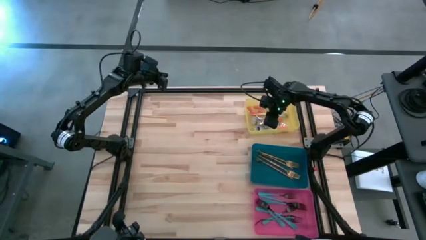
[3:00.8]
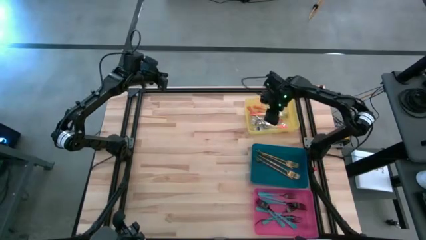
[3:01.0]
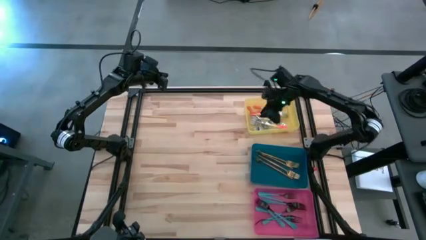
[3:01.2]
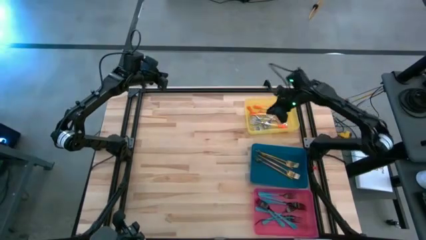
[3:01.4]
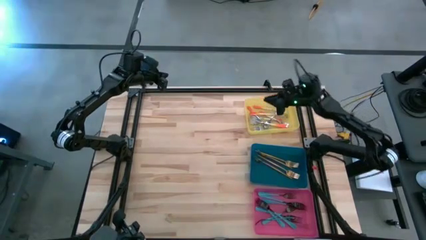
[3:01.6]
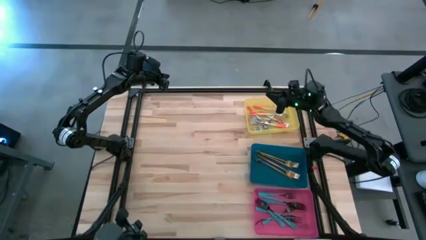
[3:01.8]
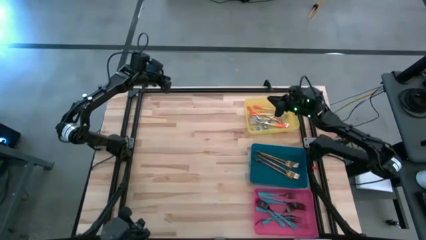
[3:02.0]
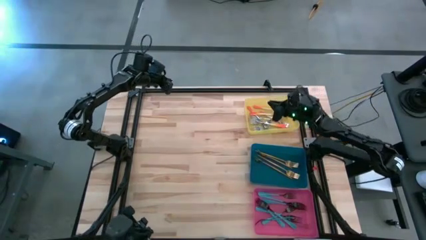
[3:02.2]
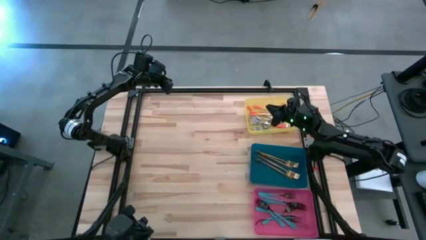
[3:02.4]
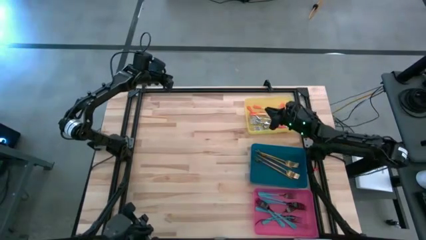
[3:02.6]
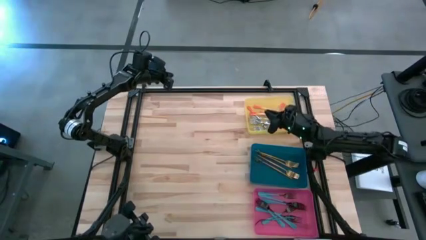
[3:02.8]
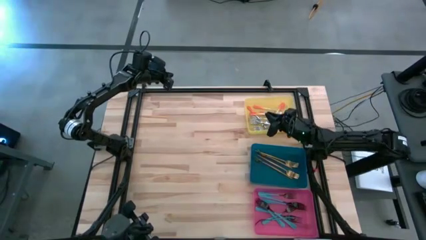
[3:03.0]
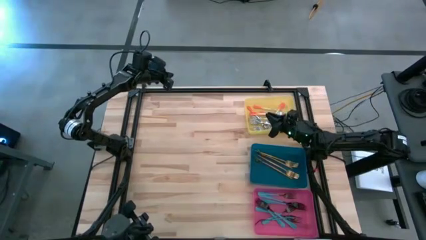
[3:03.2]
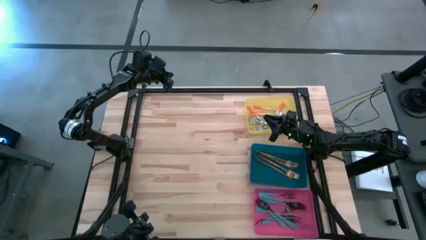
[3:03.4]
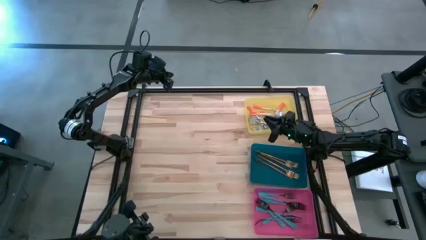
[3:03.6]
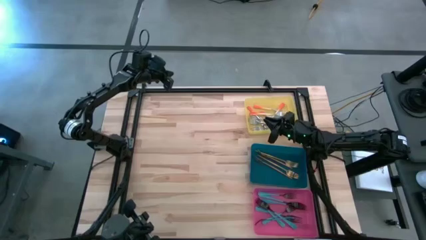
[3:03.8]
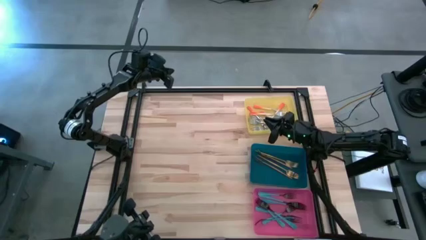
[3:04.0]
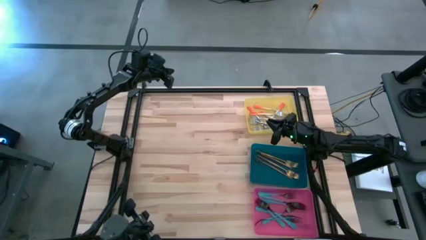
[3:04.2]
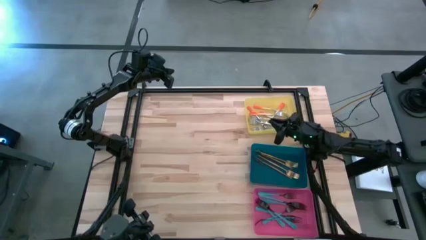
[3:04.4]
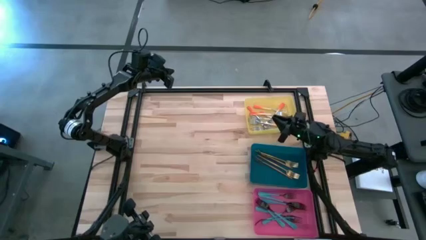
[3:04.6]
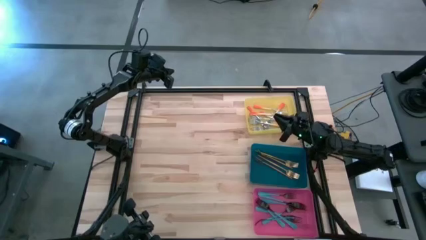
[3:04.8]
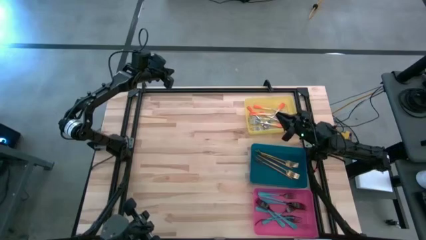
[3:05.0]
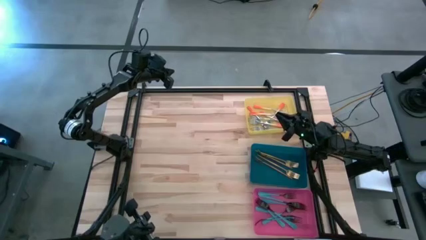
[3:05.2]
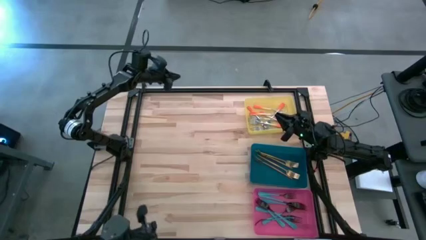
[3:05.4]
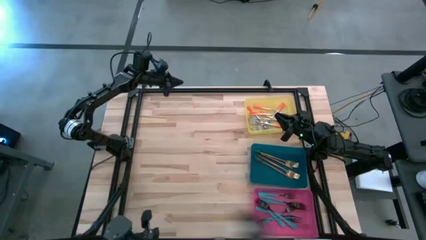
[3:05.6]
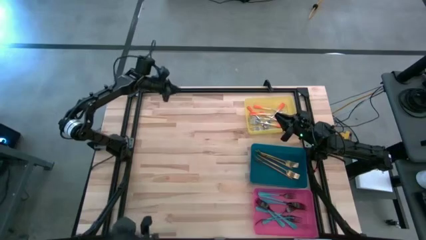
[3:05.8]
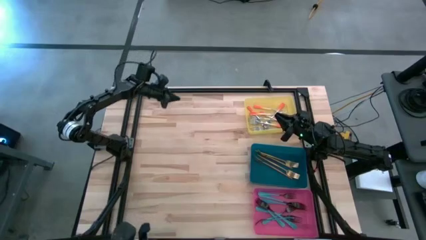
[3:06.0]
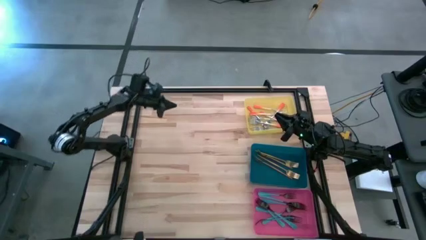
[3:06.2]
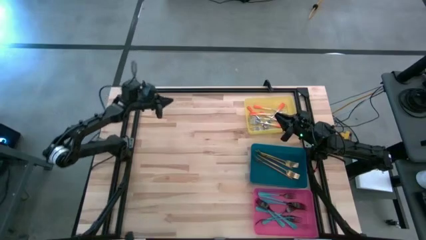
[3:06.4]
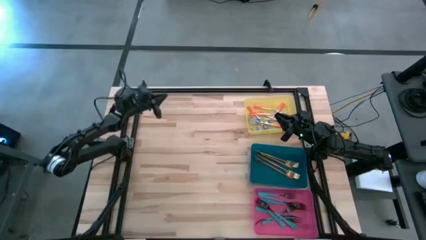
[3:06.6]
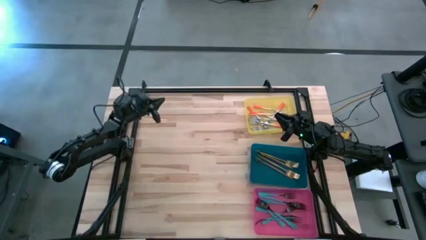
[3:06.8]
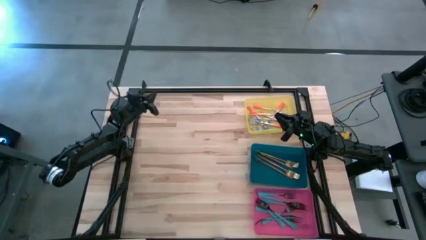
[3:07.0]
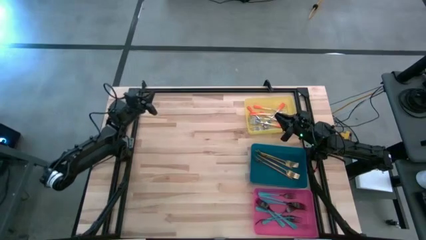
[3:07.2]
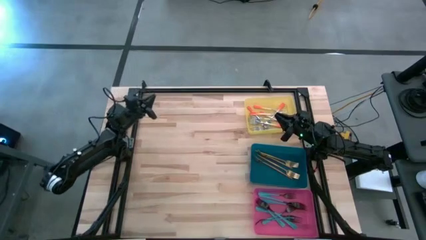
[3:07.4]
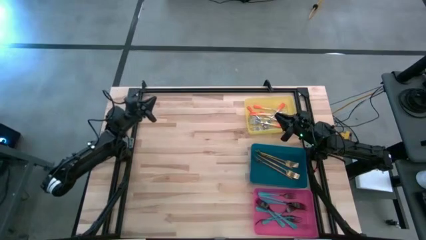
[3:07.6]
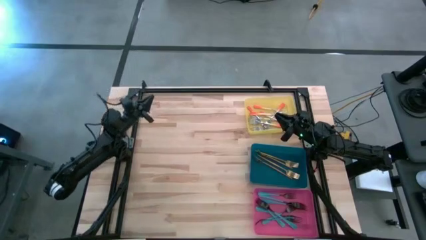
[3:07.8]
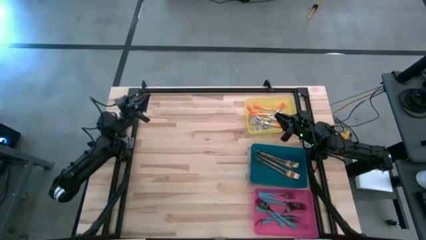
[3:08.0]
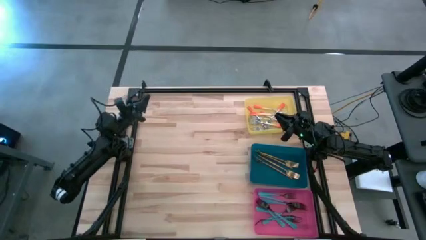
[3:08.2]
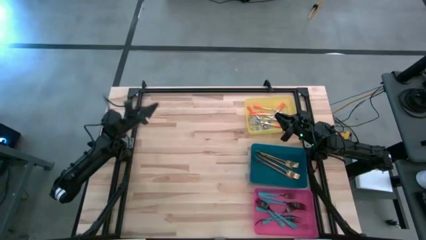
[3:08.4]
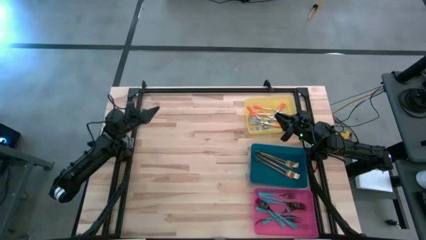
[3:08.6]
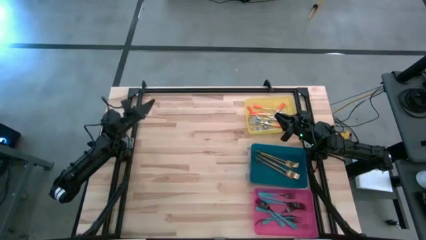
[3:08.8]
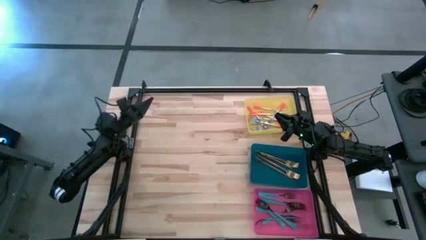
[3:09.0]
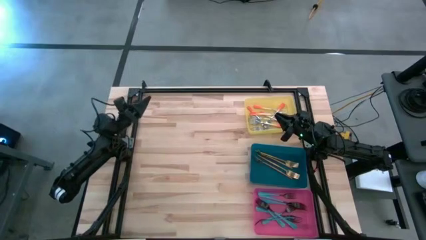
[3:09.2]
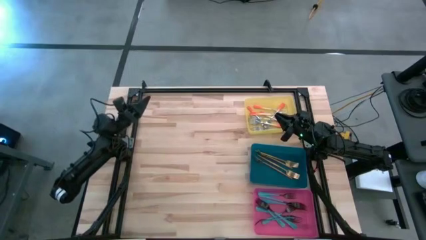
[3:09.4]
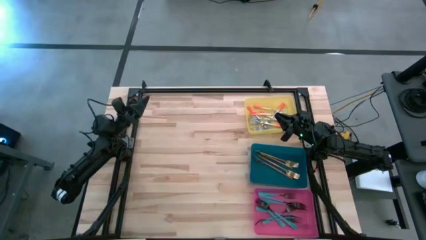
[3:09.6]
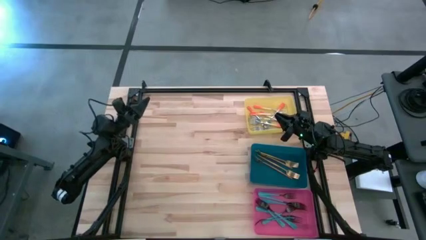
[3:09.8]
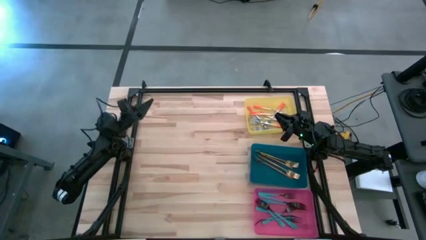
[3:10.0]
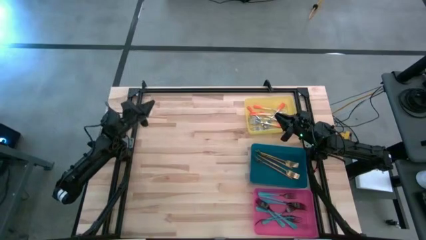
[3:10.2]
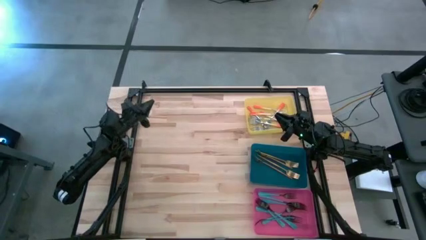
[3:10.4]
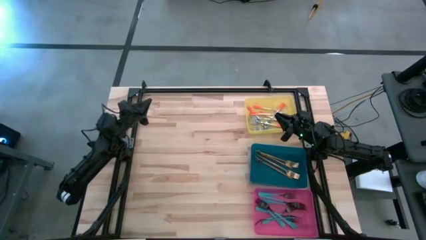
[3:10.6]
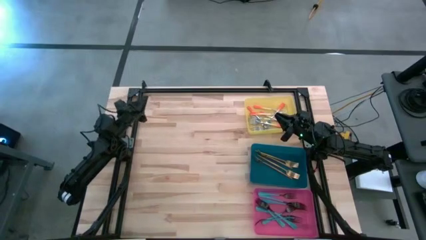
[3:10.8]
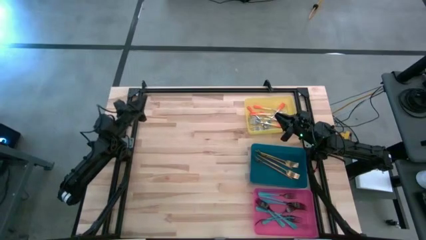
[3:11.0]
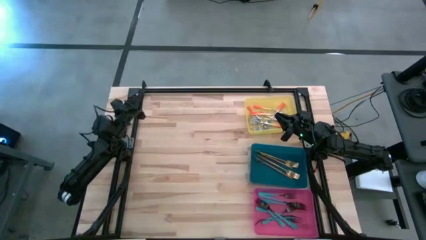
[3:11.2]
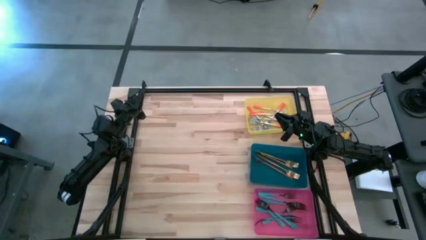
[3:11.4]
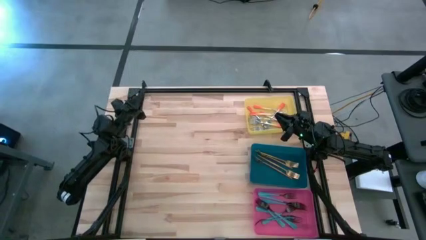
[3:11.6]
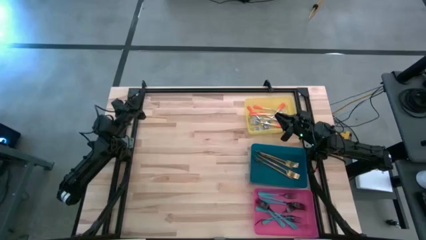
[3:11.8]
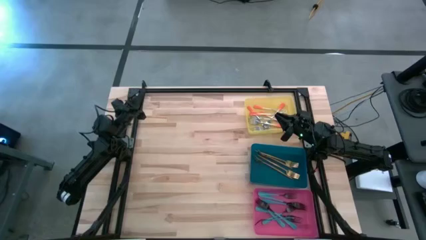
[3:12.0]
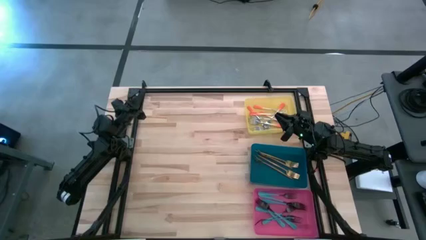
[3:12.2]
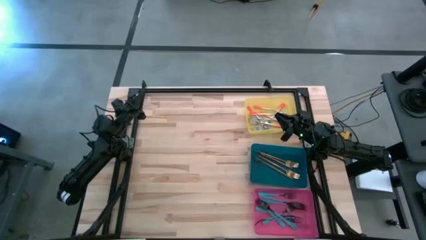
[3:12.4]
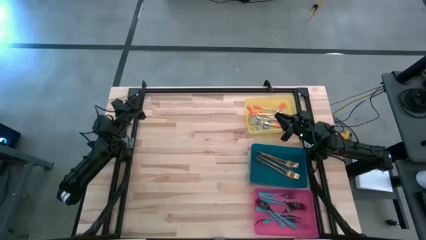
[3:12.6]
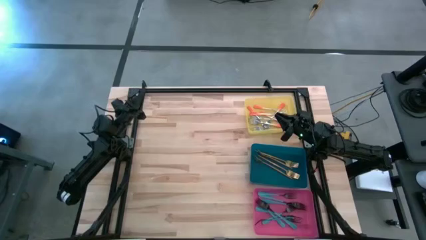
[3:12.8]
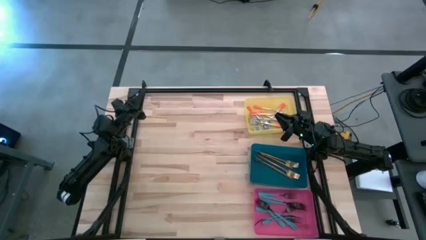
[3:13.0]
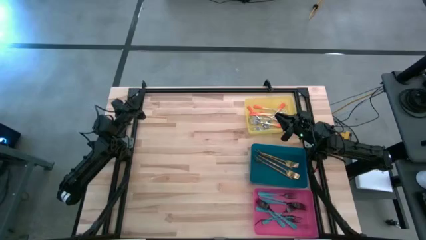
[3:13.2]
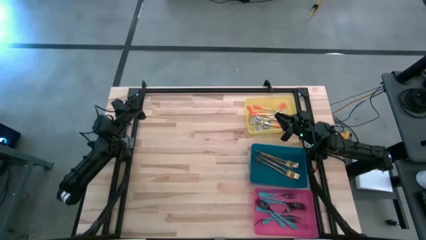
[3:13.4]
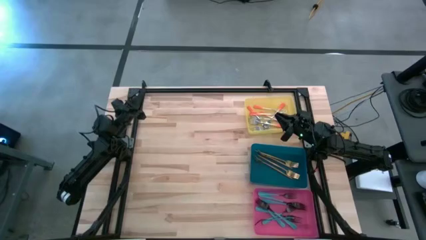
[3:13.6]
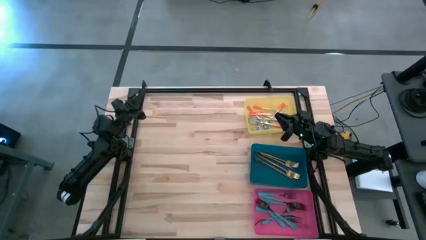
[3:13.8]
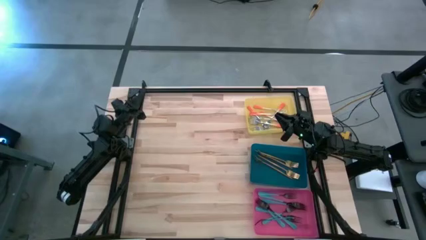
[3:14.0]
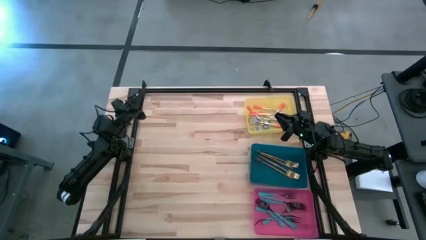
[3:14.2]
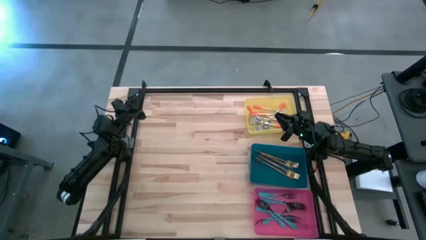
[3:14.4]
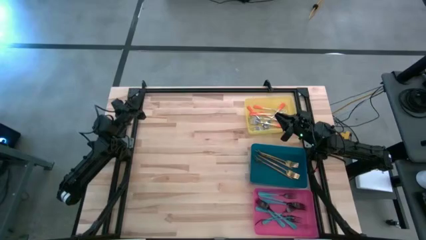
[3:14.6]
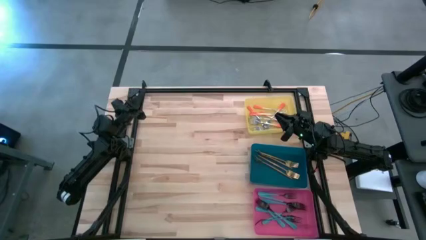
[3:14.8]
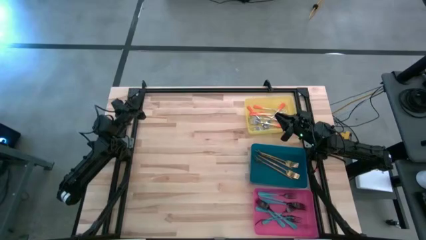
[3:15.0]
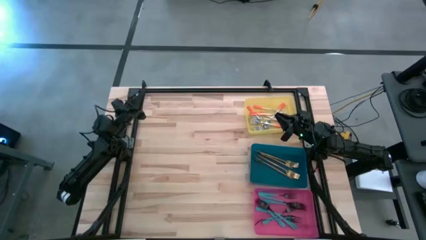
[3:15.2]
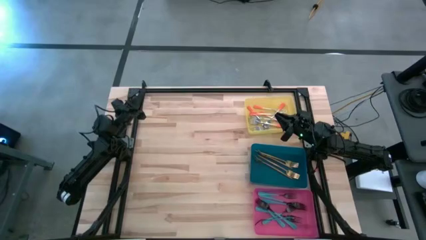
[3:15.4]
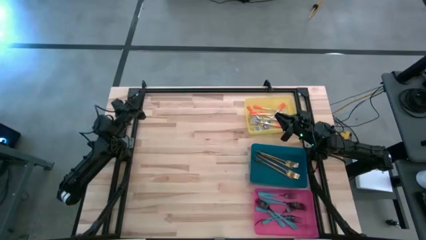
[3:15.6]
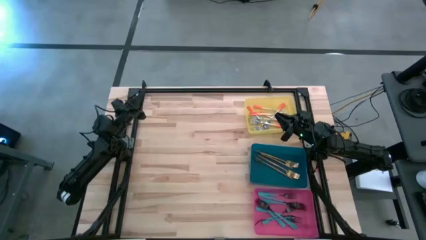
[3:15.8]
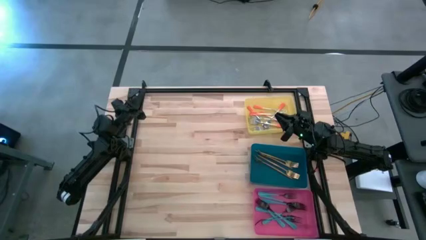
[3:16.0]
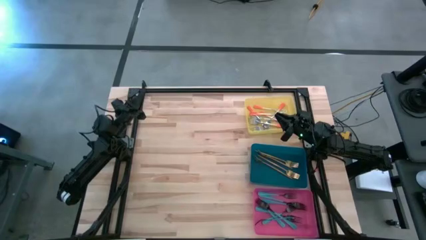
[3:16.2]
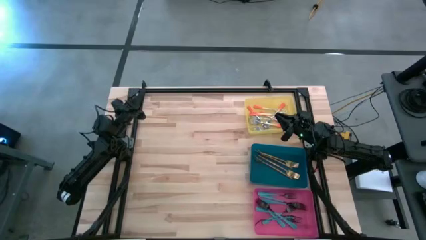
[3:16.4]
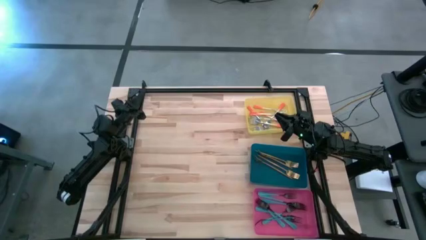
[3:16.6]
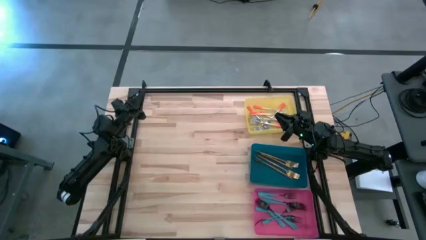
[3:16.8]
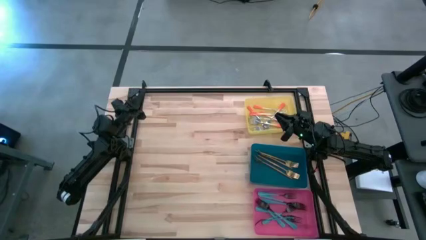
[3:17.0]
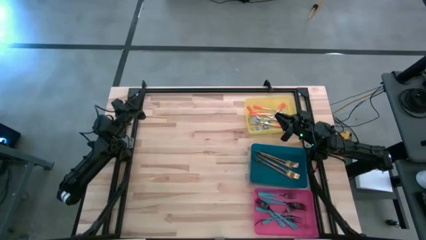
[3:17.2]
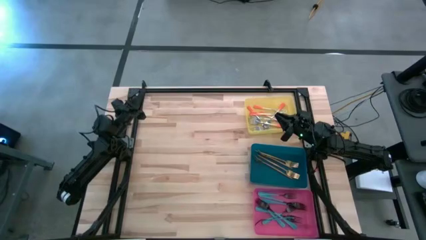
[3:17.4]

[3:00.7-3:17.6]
Task: Sort silverware by color (type)
Return to Home Position
